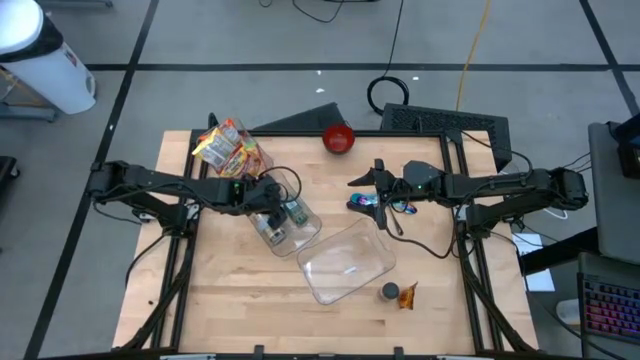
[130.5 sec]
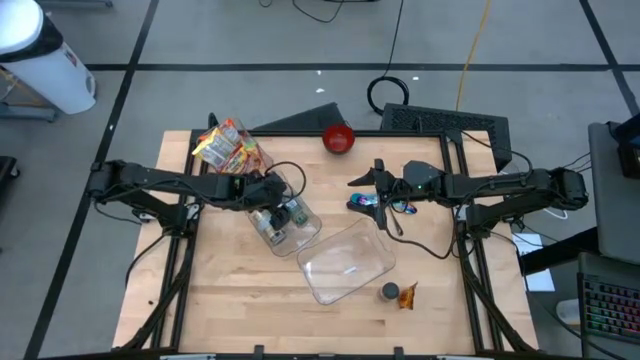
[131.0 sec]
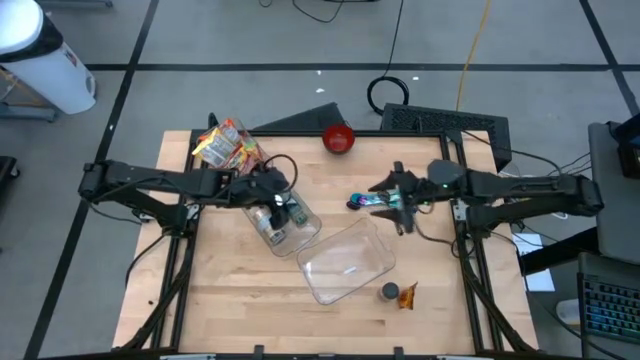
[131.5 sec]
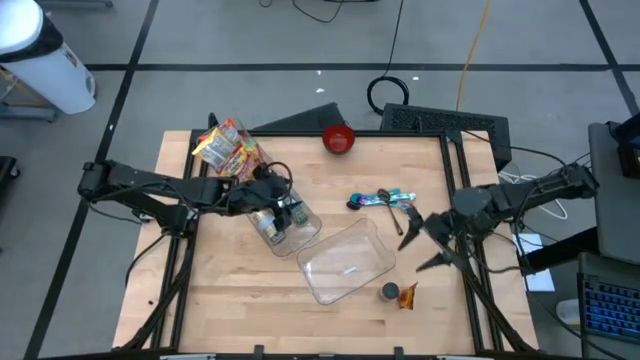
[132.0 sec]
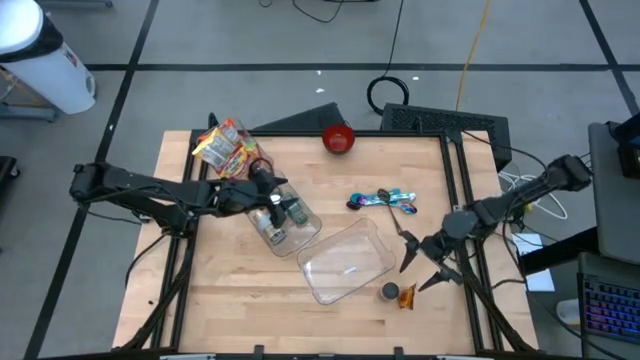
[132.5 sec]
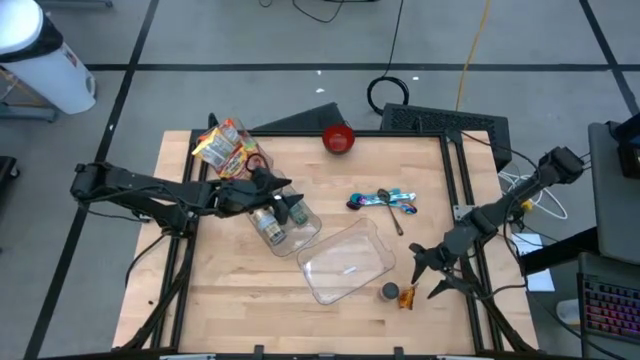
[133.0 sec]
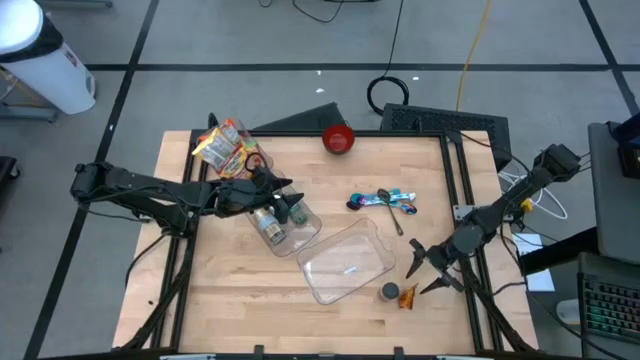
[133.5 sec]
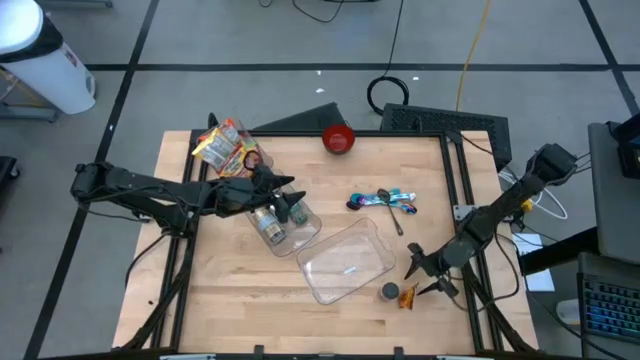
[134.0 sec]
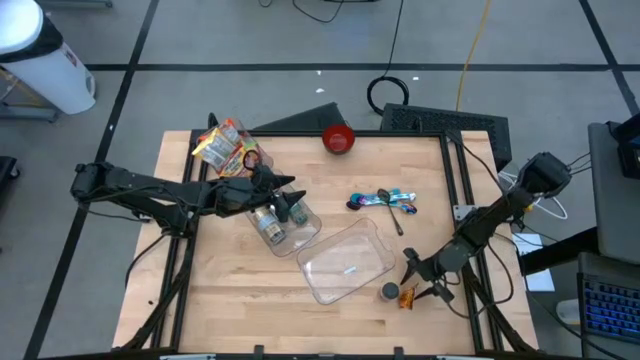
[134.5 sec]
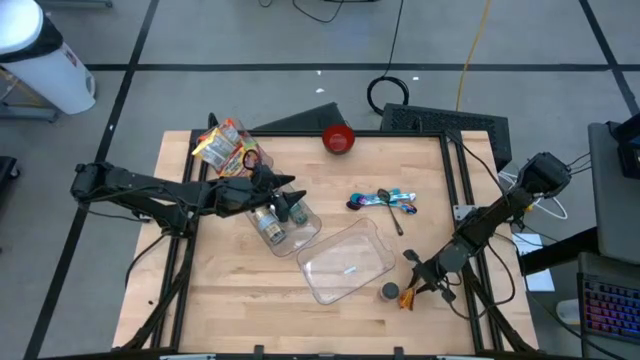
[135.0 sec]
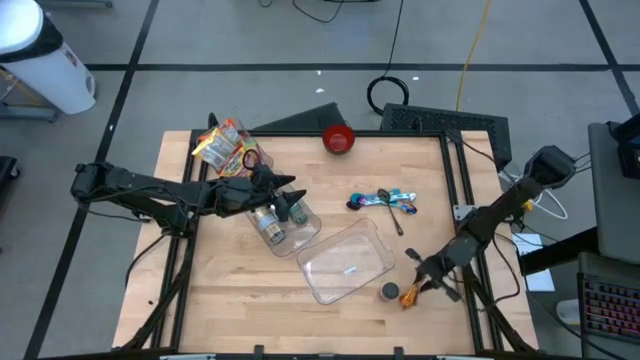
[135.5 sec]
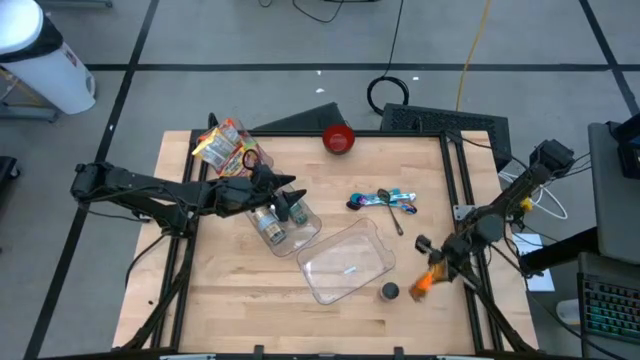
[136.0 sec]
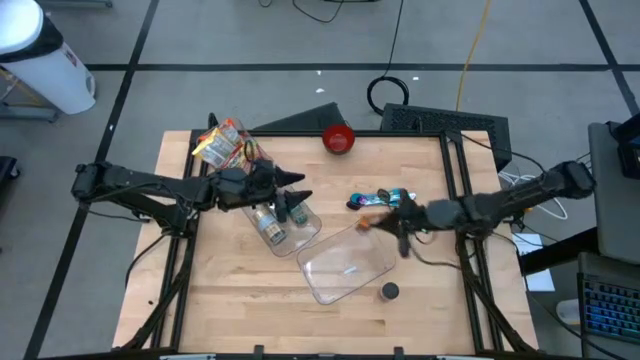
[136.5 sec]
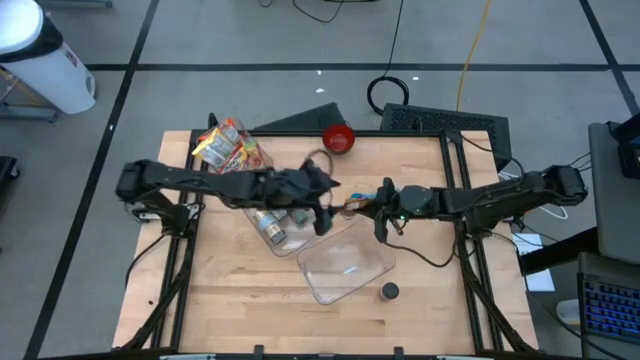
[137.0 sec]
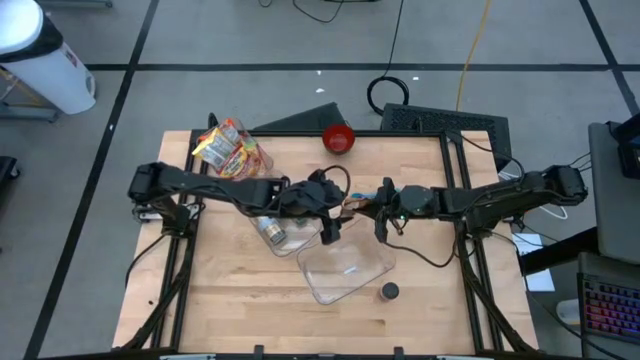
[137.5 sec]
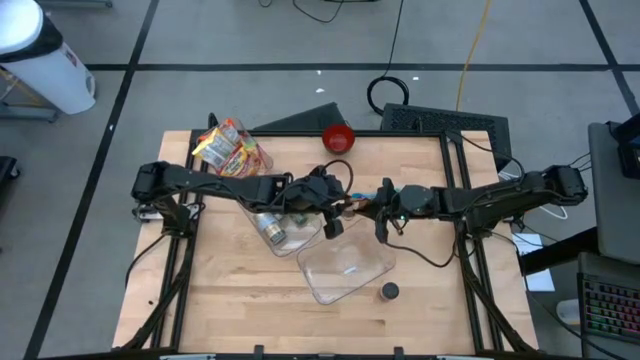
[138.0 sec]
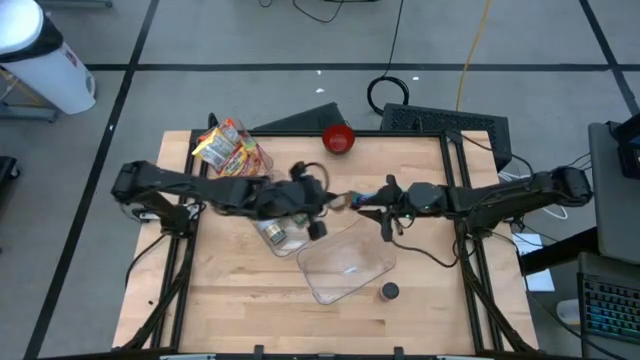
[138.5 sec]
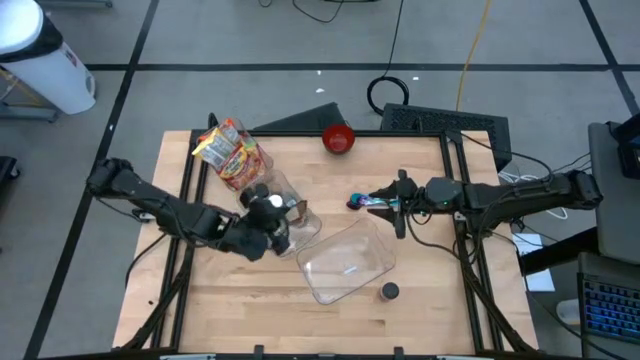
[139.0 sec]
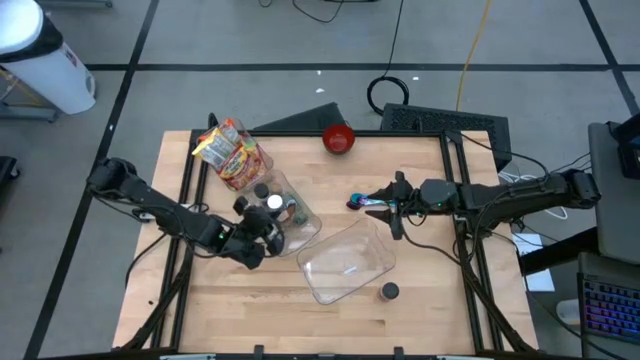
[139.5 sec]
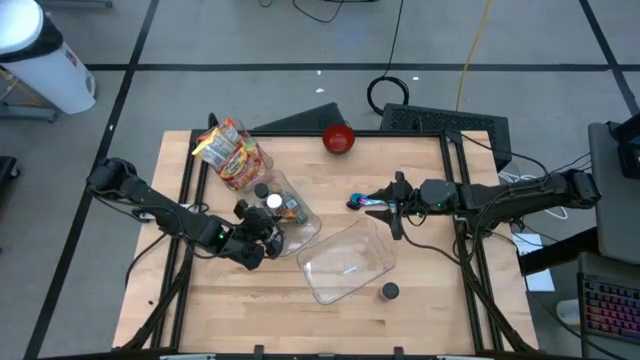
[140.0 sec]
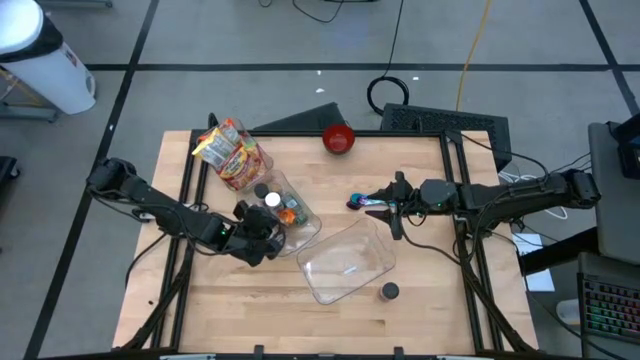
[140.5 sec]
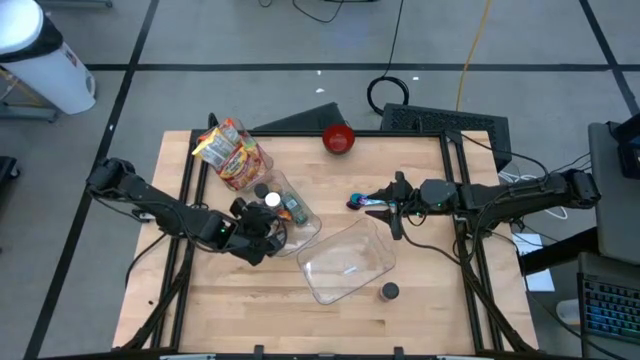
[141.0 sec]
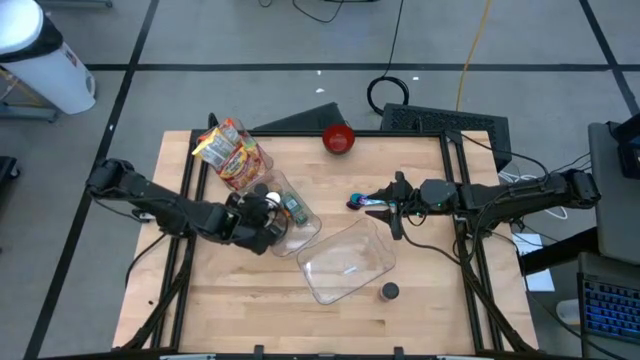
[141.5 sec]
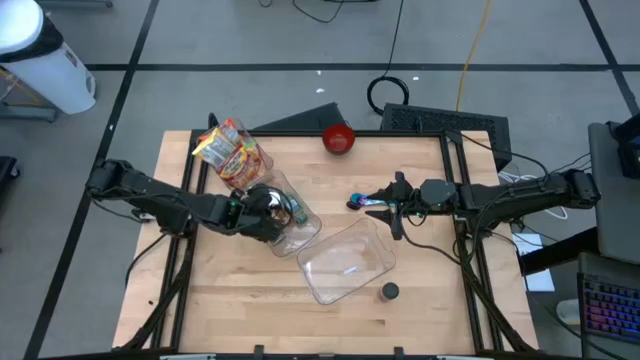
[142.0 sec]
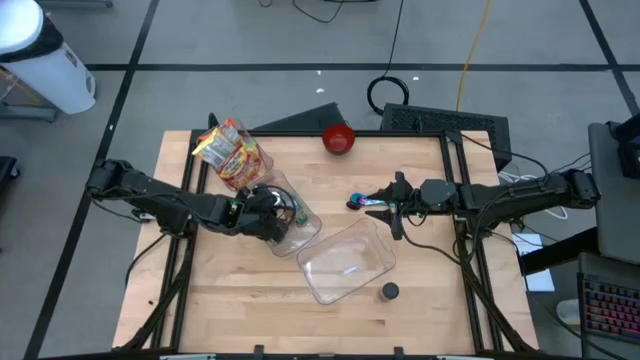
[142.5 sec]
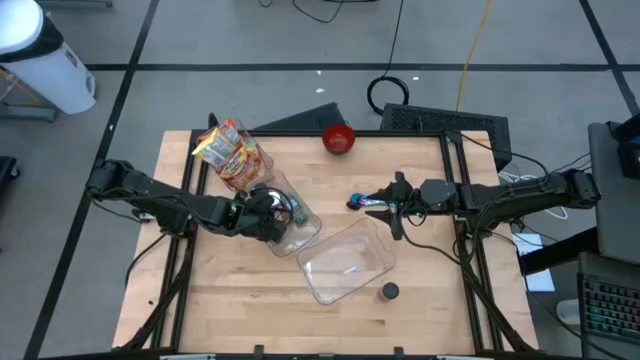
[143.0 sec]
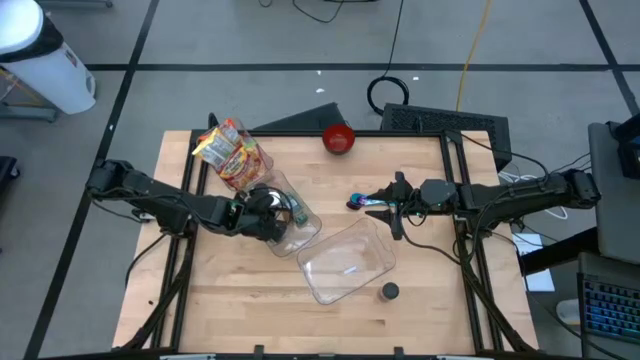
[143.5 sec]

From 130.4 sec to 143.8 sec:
Task: Pick & Place Food Item
Put the orange seasoning pack into the middle transparent bin

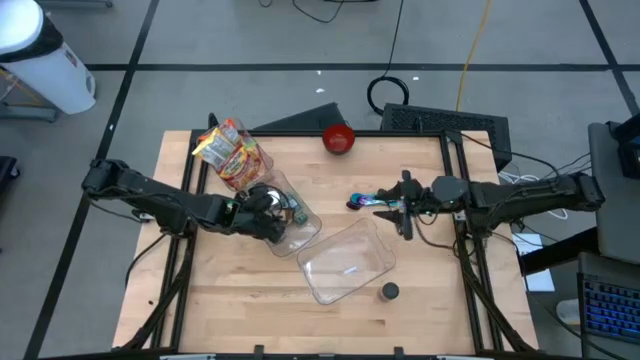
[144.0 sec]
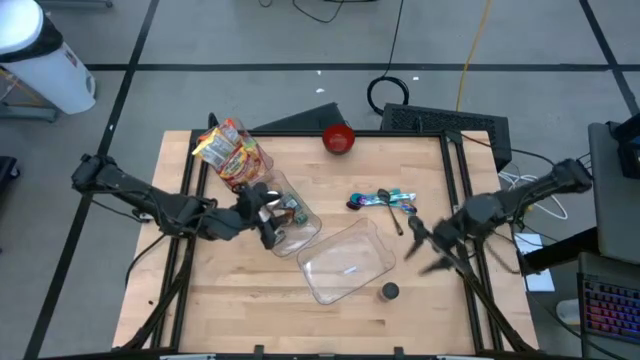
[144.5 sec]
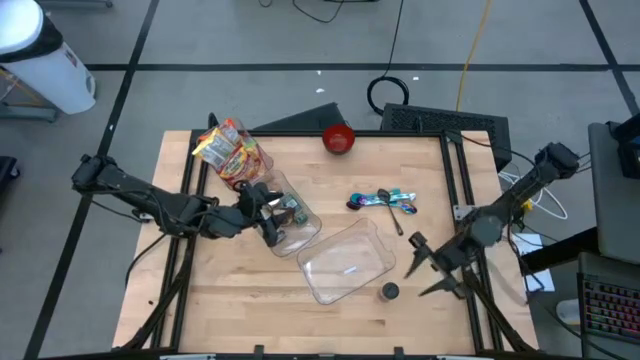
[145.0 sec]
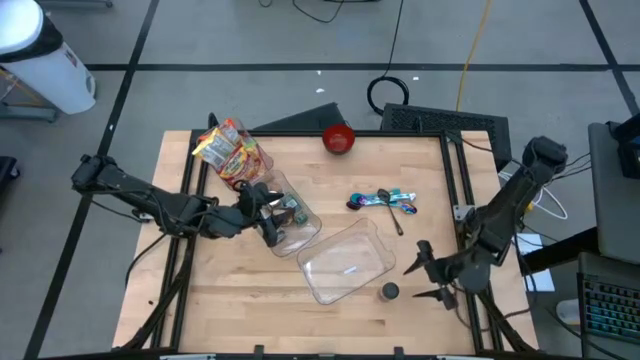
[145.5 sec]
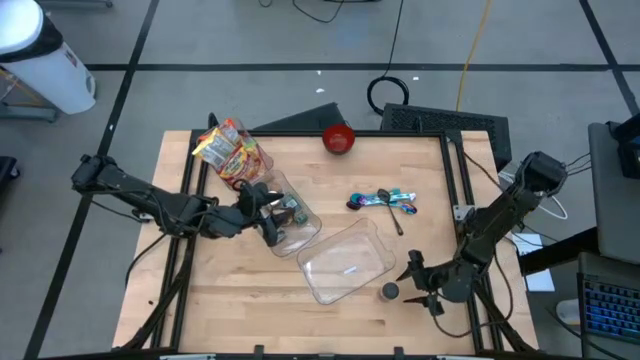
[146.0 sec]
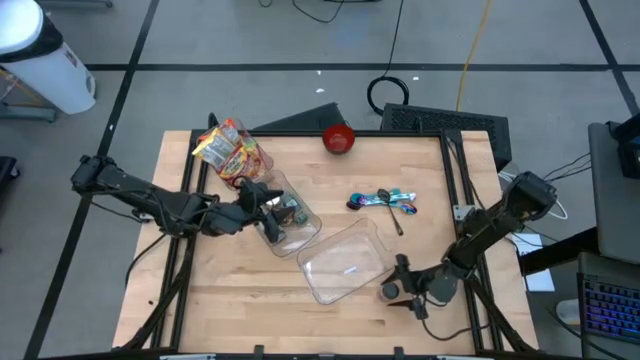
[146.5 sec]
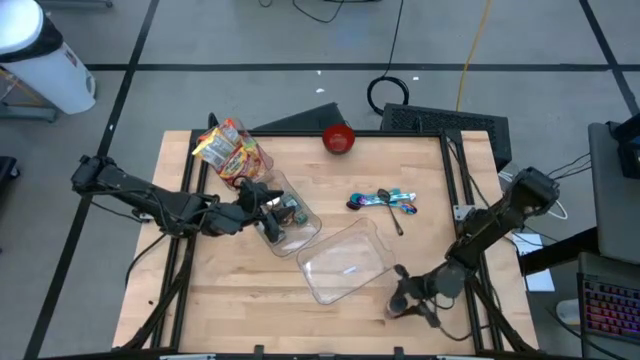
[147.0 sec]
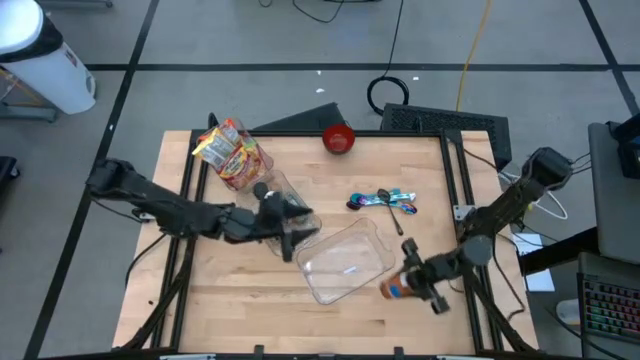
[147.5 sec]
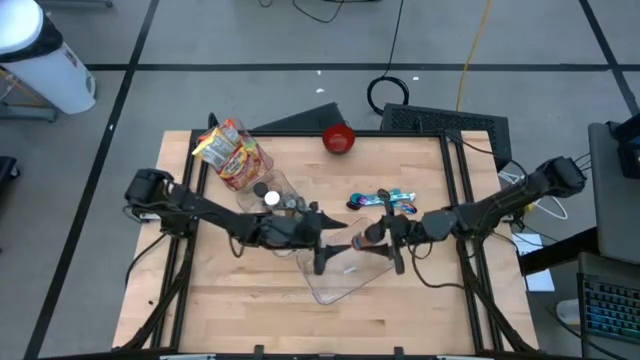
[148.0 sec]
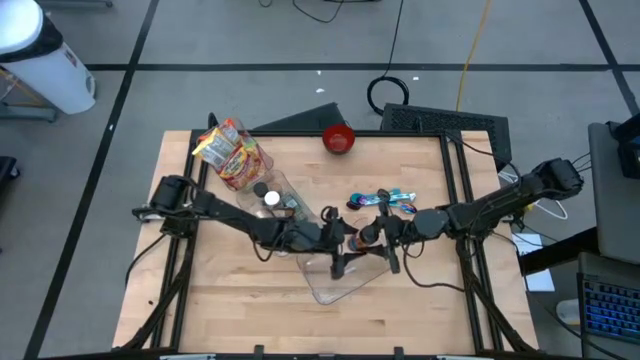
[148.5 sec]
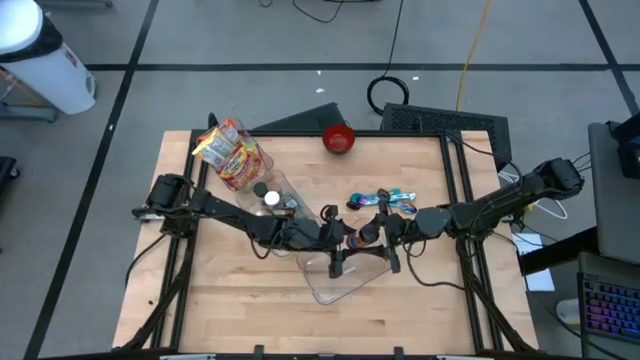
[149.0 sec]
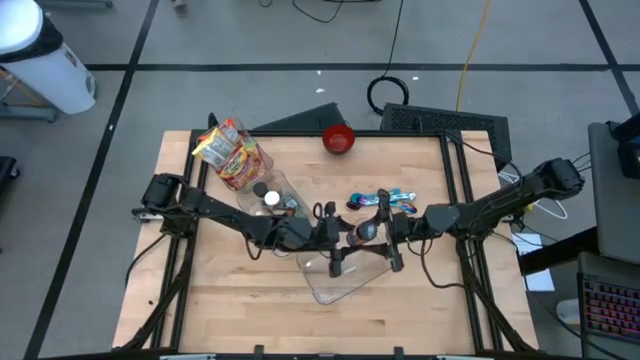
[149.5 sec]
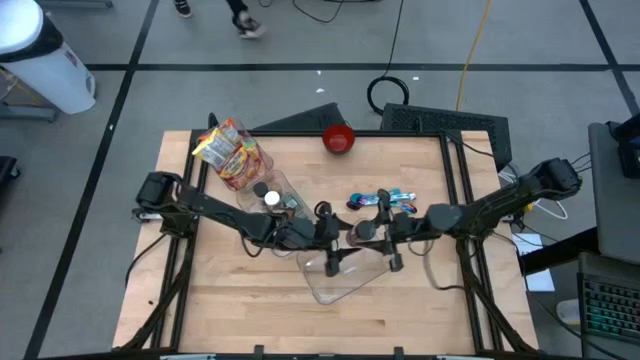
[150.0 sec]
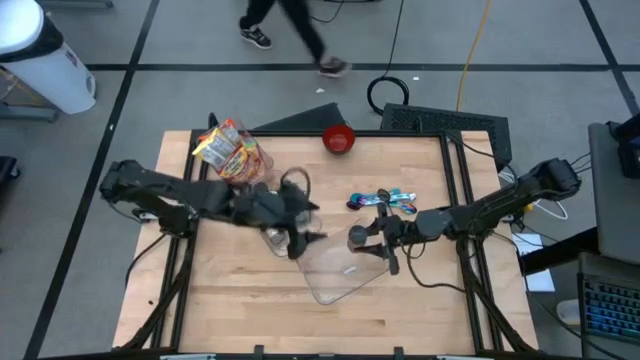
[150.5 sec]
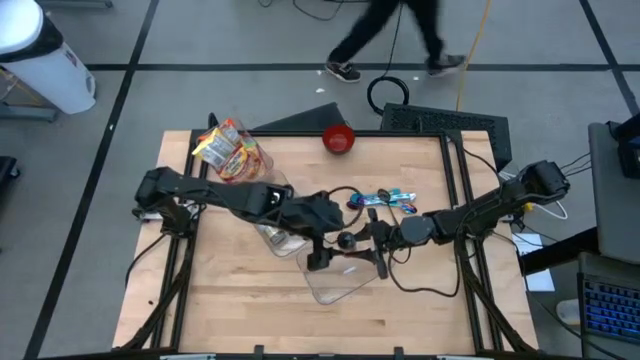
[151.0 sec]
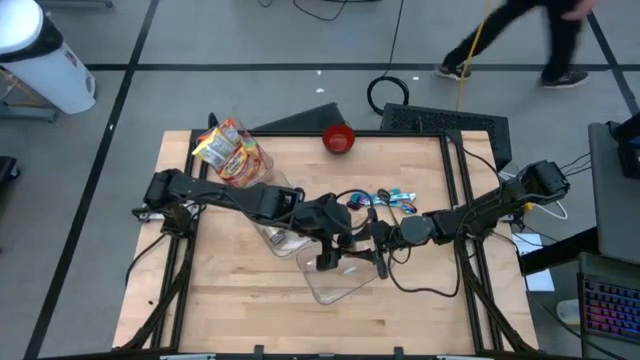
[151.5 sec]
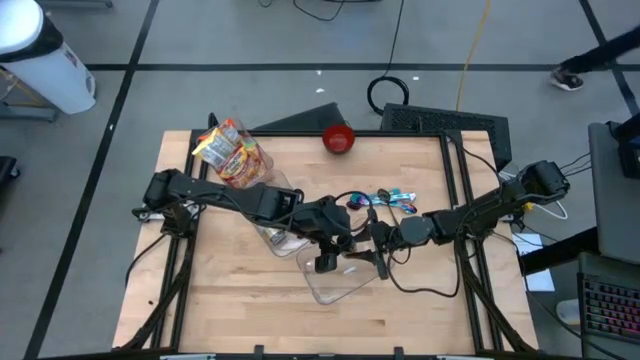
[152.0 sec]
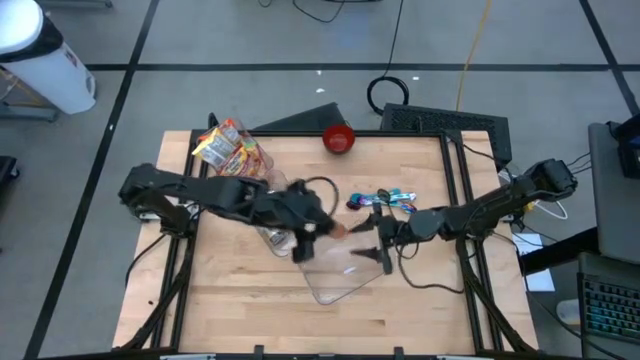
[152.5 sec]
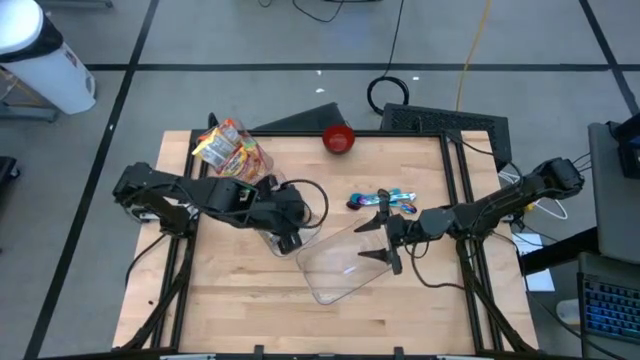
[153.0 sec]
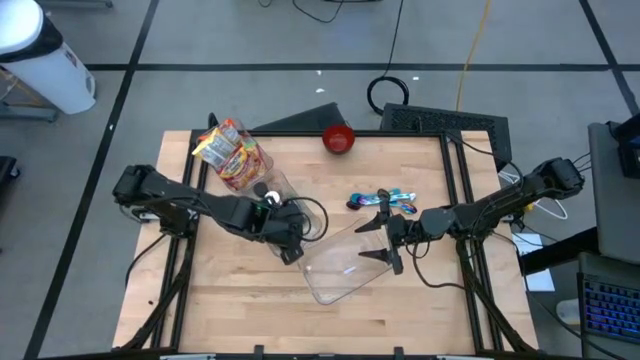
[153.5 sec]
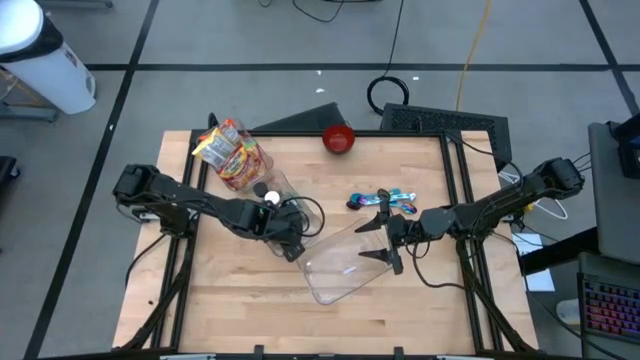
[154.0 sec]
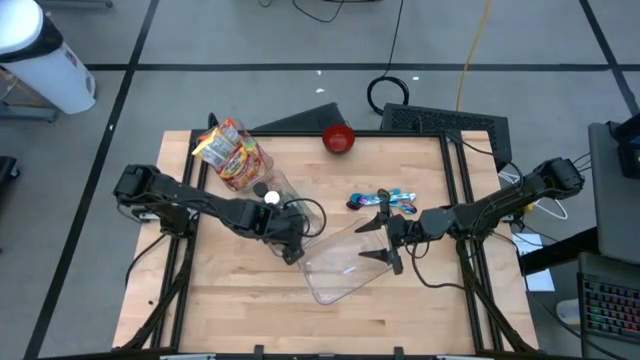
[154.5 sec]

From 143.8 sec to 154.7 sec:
Put the orange seasoning bottle into the middle transparent bin
